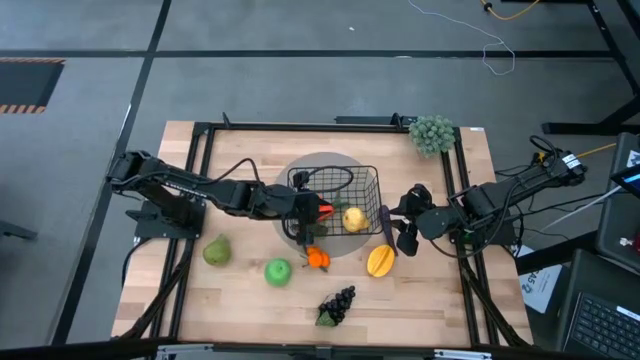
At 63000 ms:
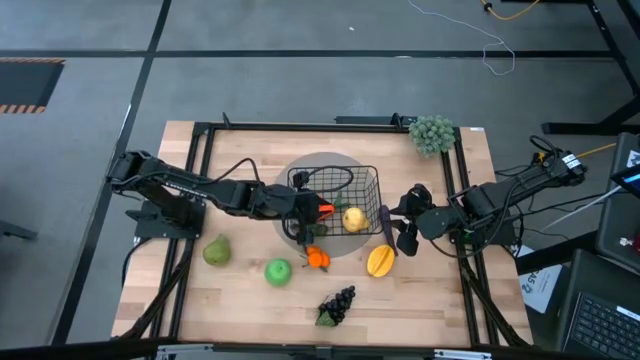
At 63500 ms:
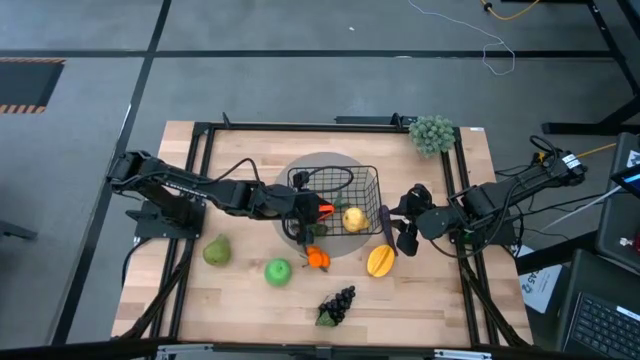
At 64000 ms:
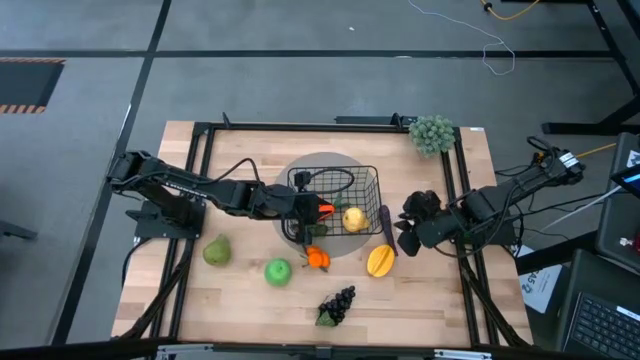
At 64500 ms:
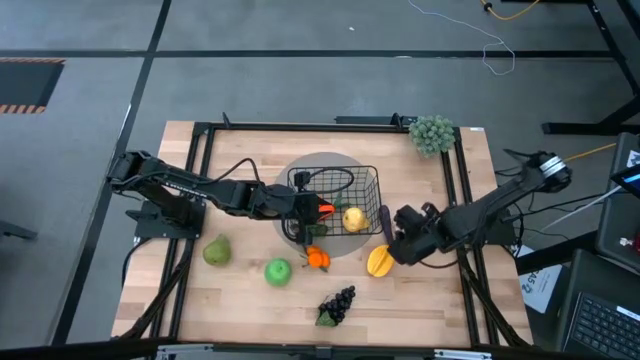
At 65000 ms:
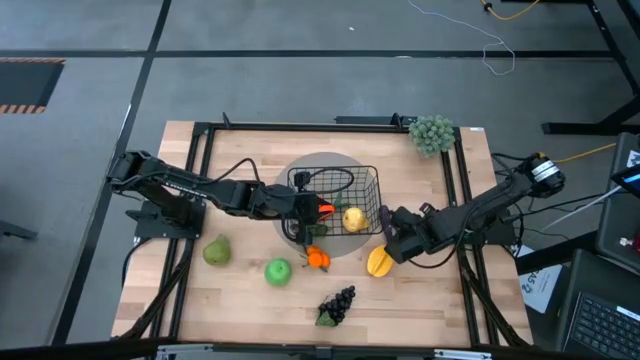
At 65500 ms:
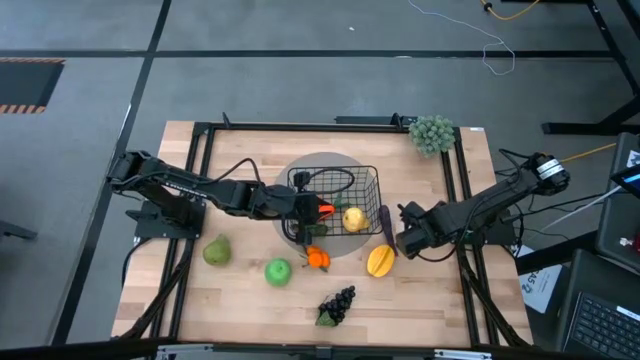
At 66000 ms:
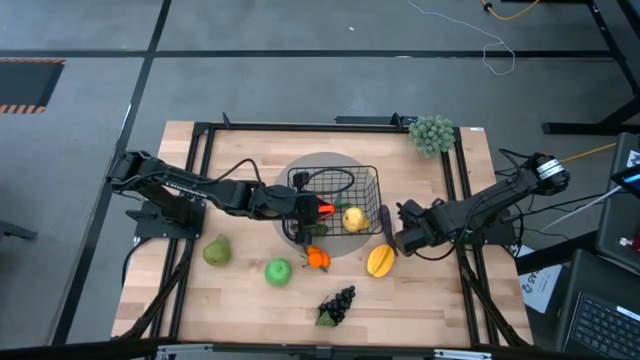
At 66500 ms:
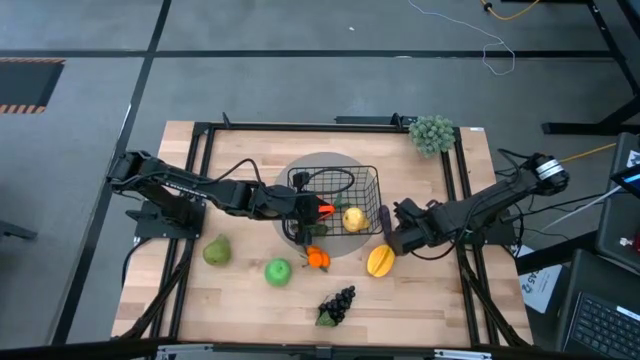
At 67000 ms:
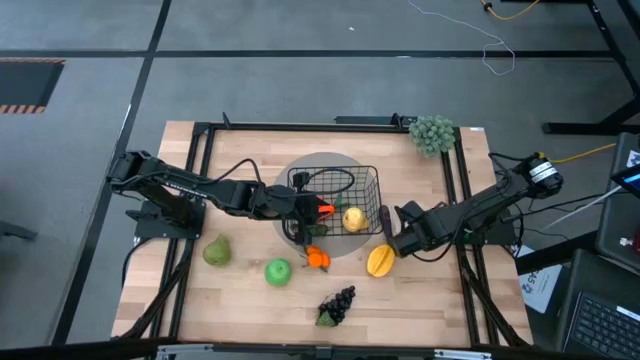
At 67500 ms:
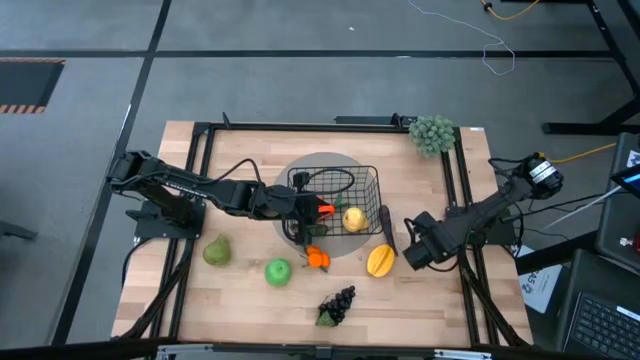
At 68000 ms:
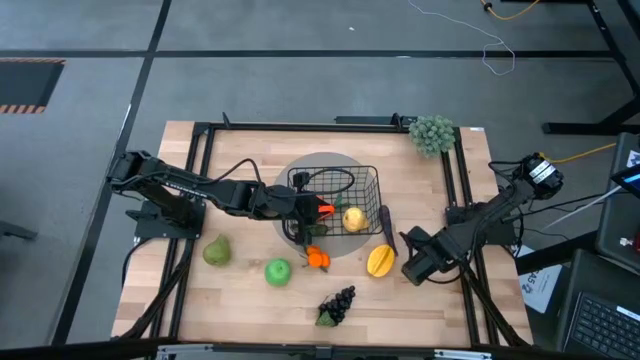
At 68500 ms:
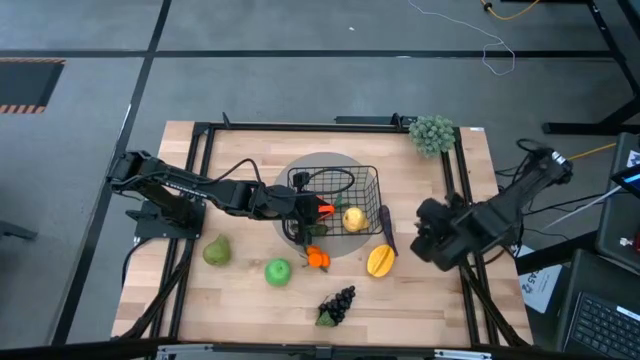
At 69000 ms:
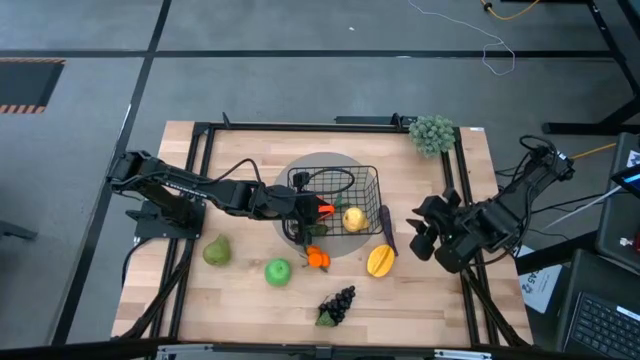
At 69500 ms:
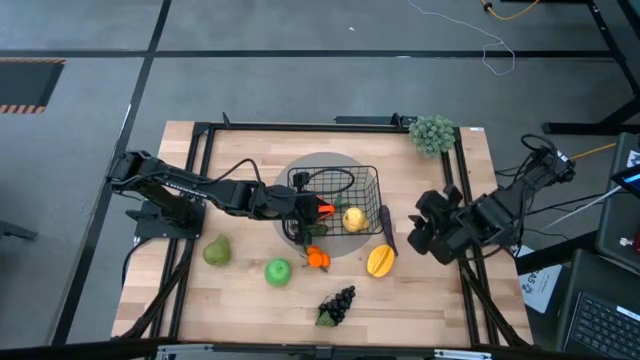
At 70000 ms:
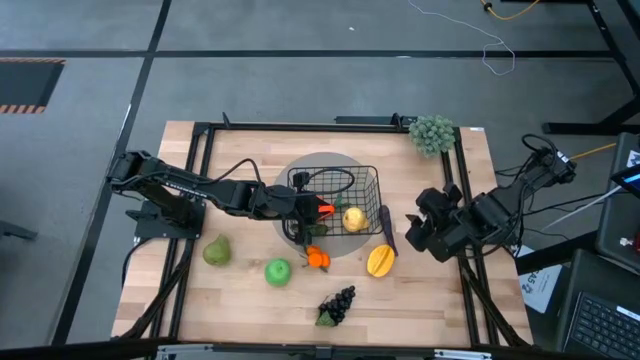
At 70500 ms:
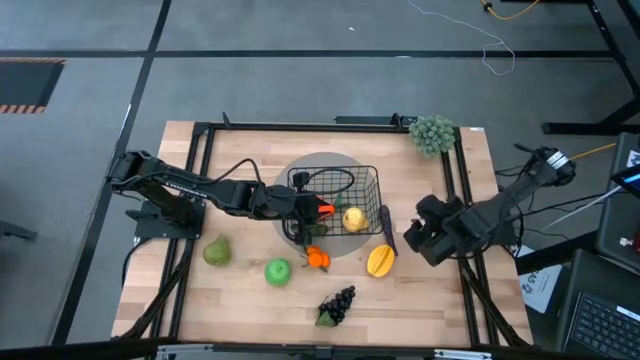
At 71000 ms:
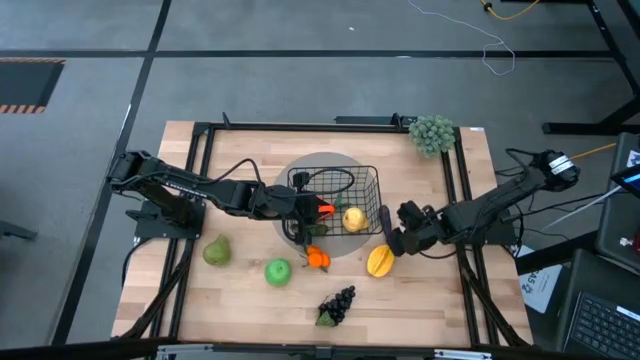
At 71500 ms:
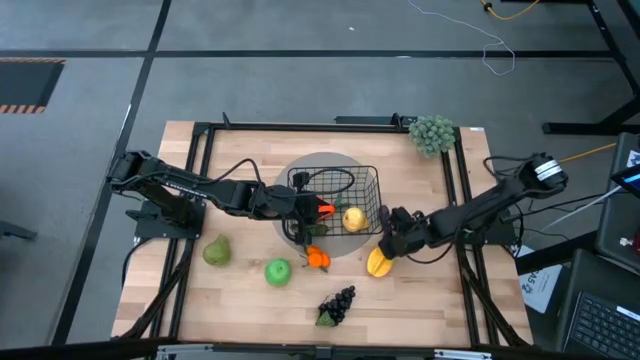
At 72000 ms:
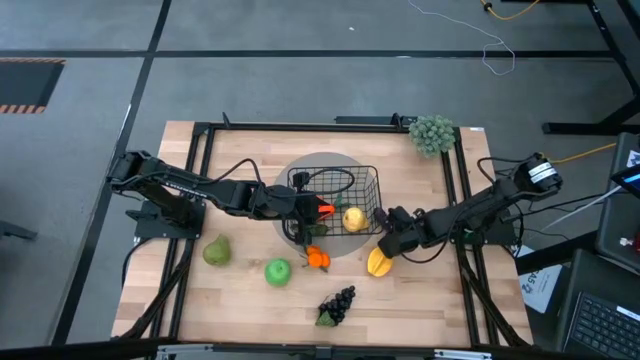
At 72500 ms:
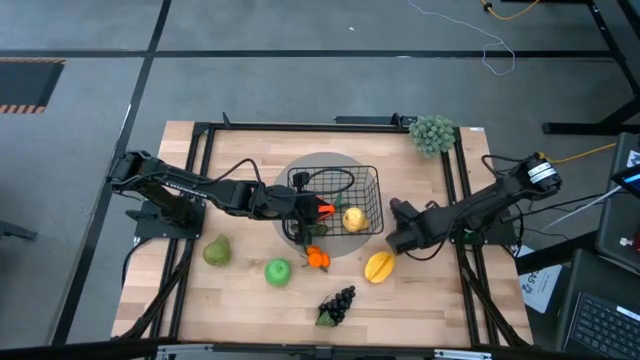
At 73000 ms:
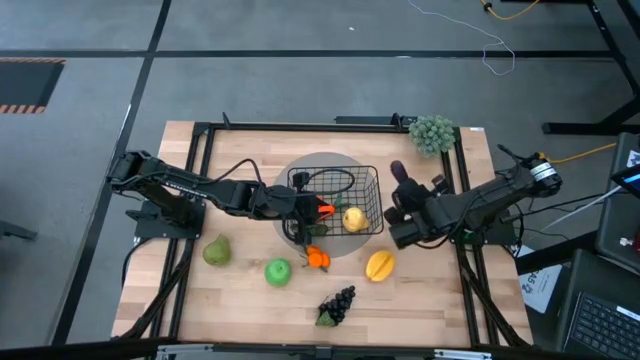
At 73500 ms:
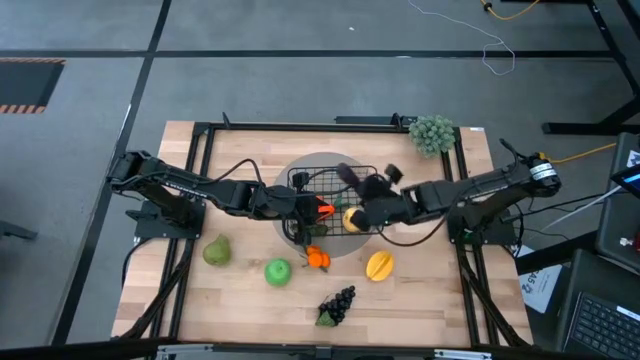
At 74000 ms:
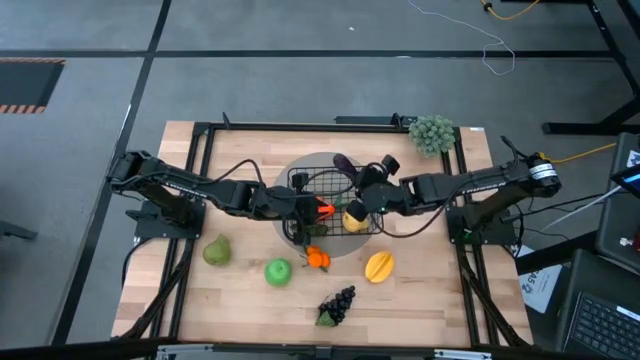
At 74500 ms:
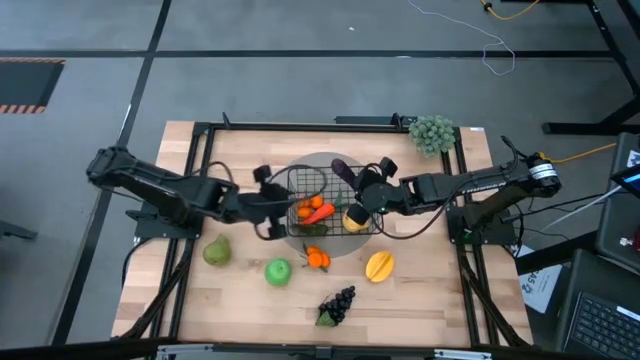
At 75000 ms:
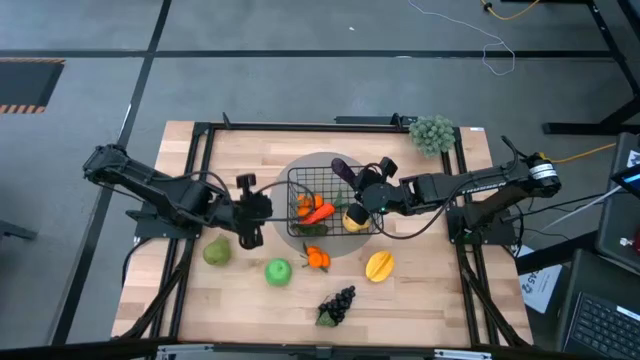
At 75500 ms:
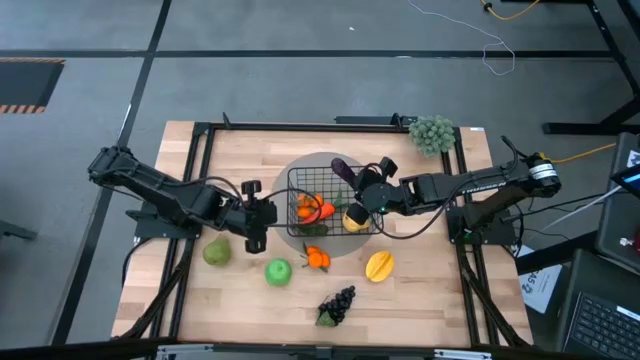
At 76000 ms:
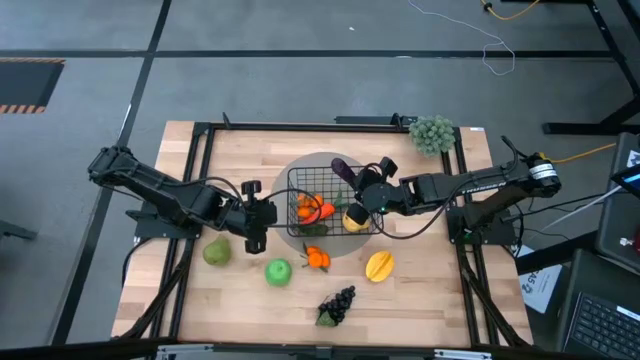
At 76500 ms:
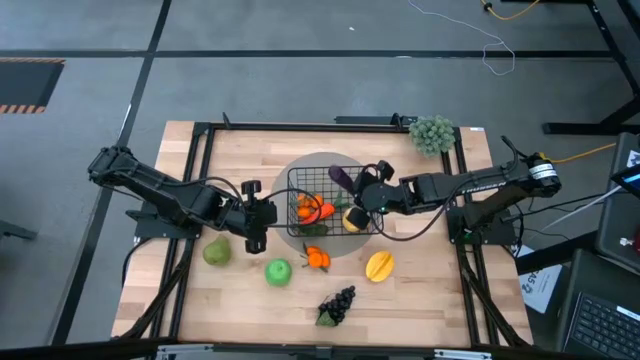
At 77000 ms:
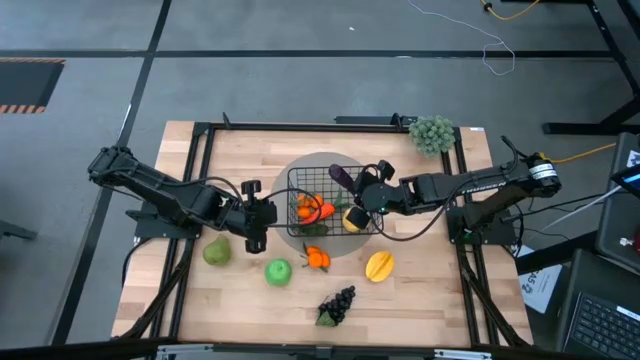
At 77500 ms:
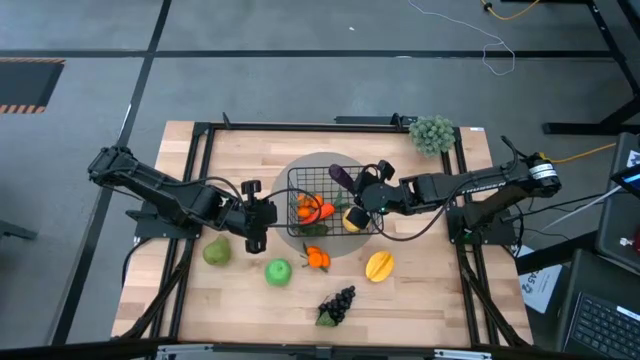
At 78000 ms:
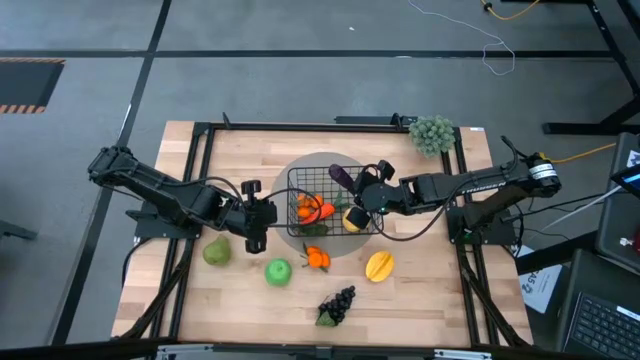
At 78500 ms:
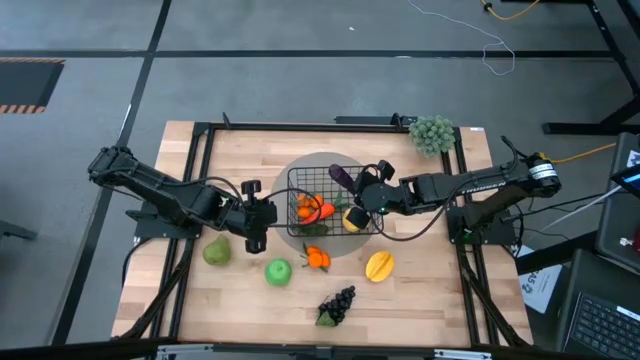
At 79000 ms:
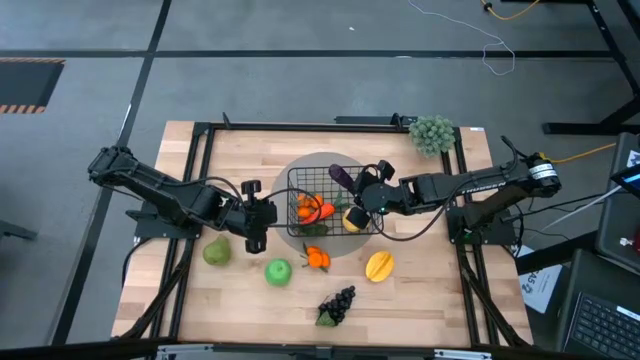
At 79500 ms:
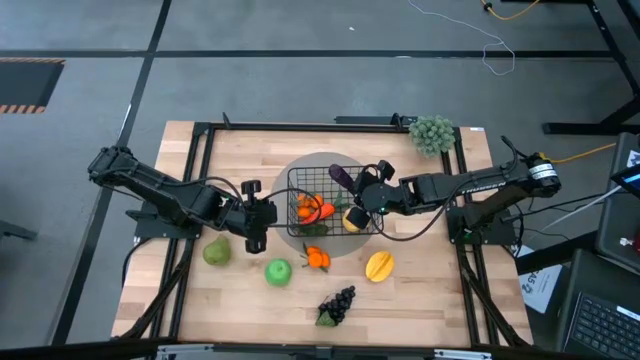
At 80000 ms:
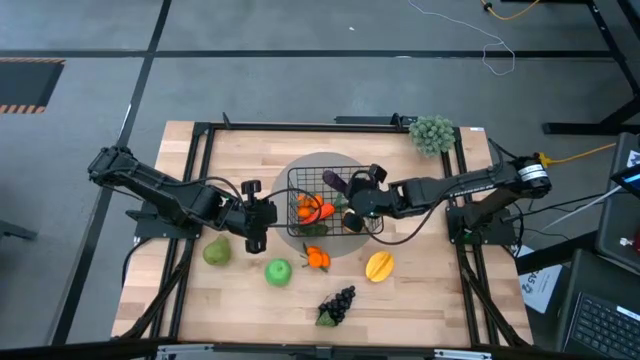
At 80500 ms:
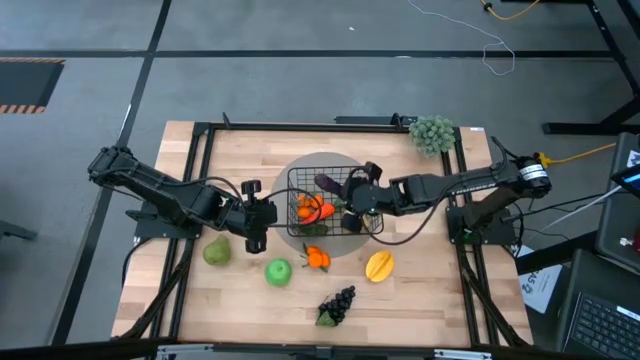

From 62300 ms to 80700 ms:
Task: Build produce basket
Put the purple eggplant into the wire basket

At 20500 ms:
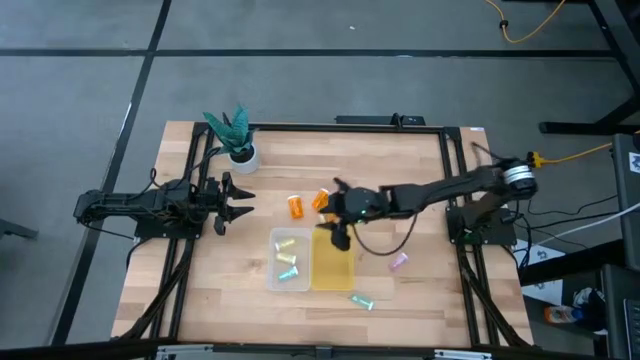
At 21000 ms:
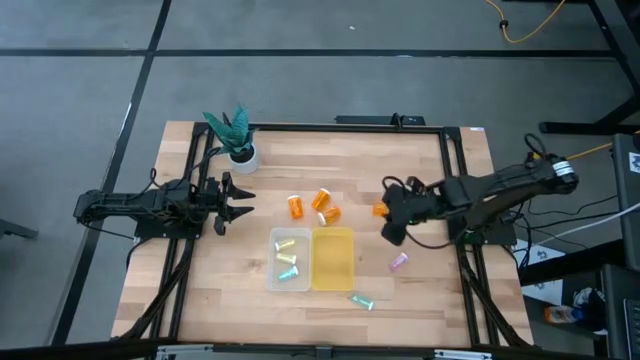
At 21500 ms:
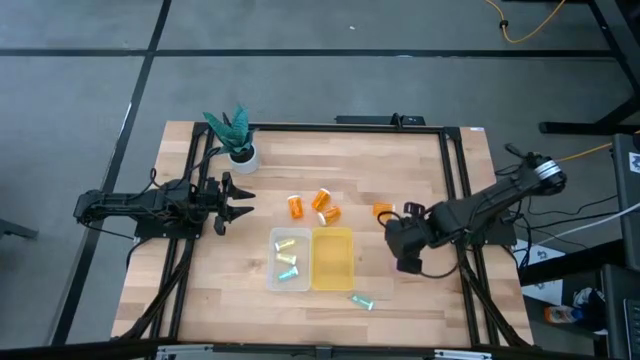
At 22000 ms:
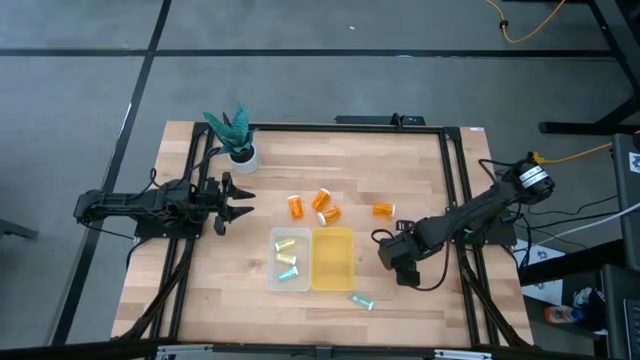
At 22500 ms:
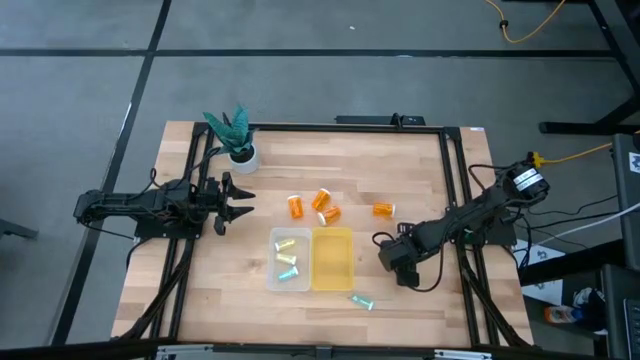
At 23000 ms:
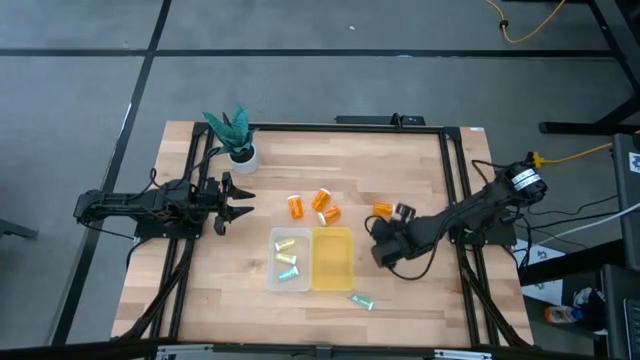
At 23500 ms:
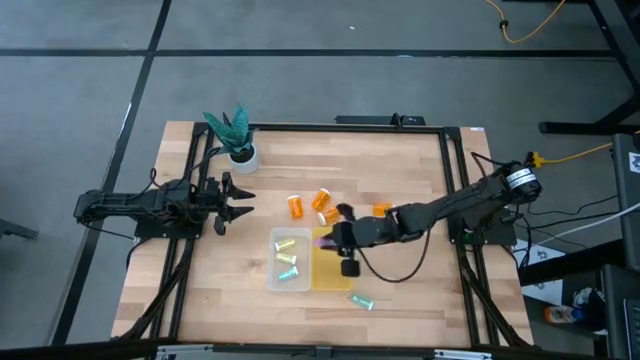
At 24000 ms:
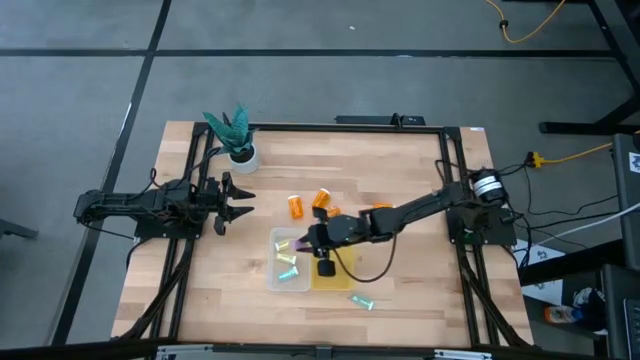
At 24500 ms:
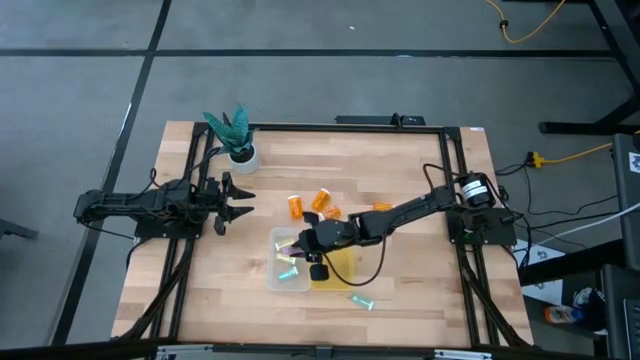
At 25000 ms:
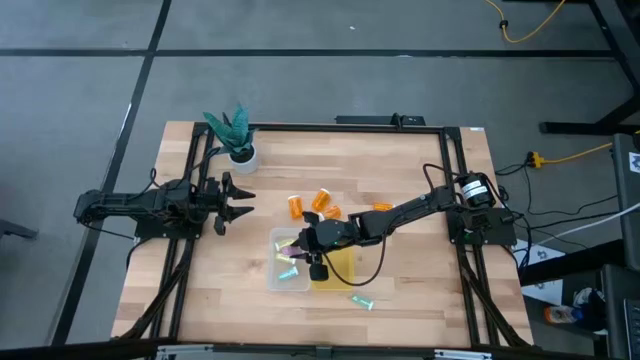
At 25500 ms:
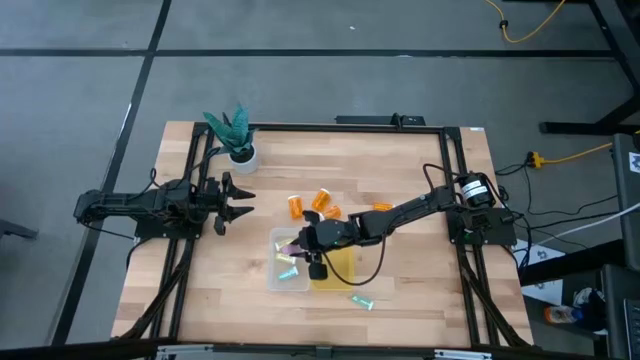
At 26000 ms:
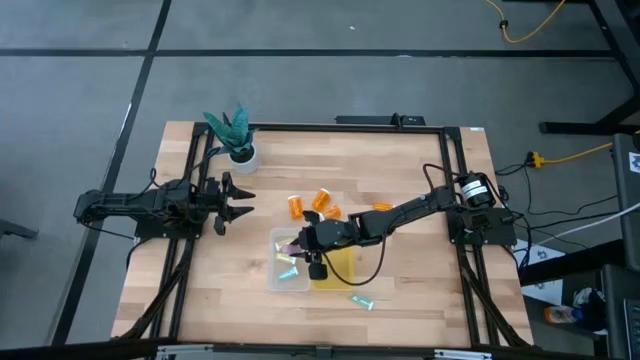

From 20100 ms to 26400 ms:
Task: Pick and place medicine bottles into bin by pill shape (circle, oval)
Put the purple tablet bottle into the transparent bin
